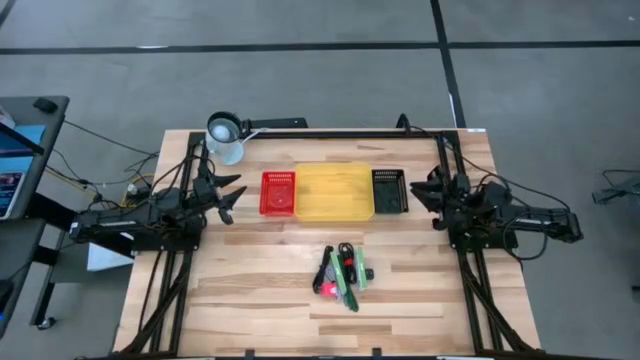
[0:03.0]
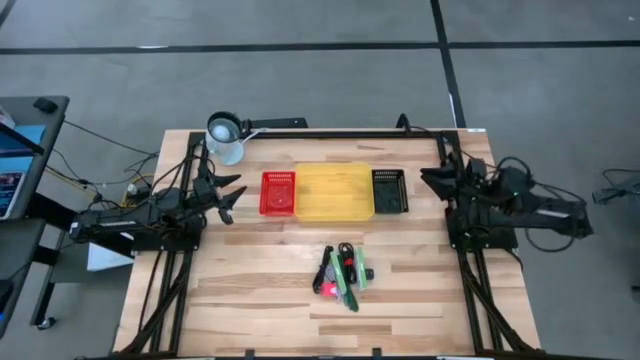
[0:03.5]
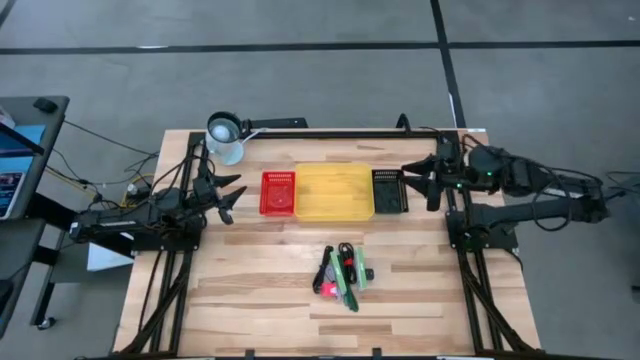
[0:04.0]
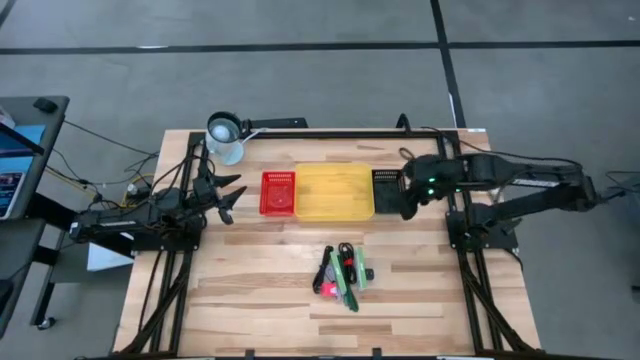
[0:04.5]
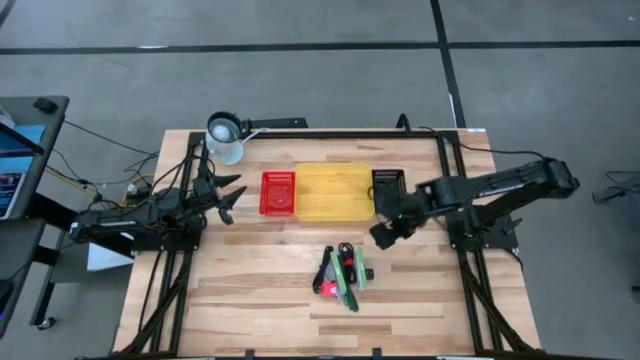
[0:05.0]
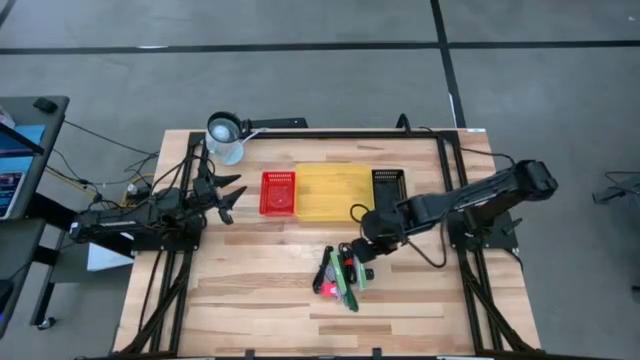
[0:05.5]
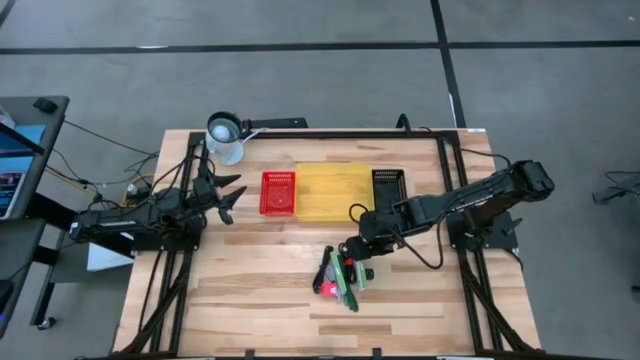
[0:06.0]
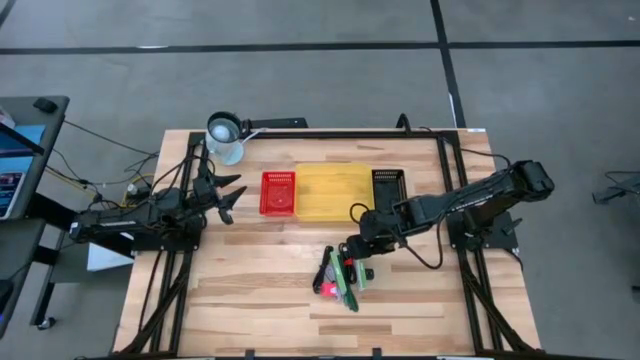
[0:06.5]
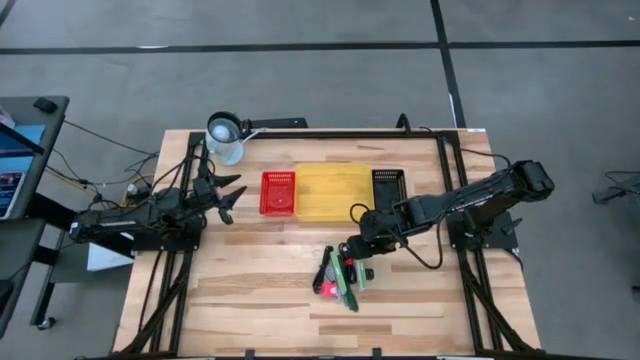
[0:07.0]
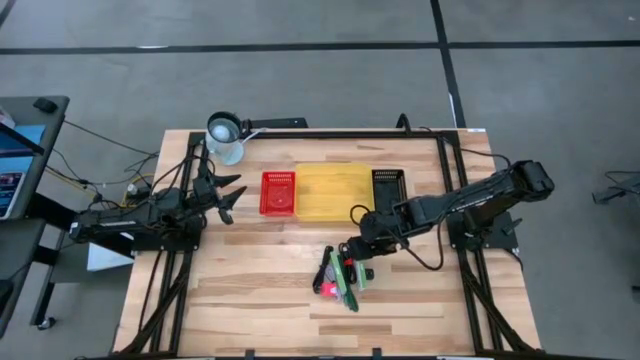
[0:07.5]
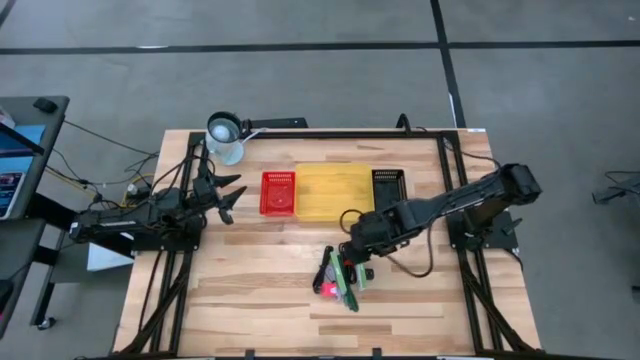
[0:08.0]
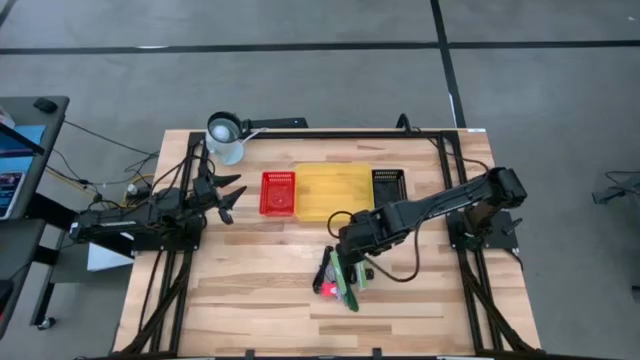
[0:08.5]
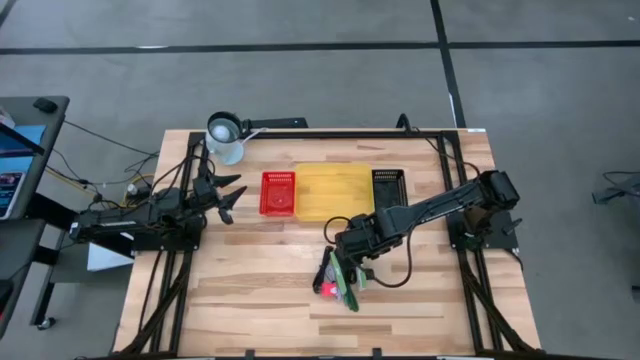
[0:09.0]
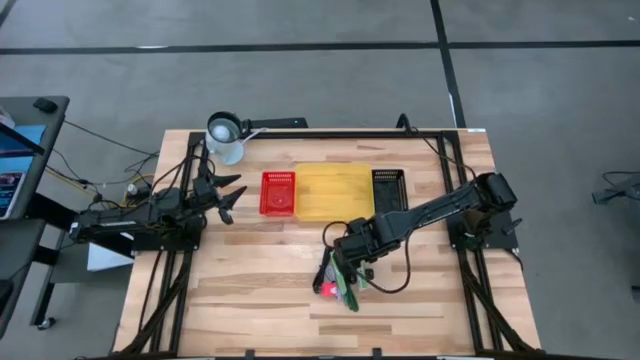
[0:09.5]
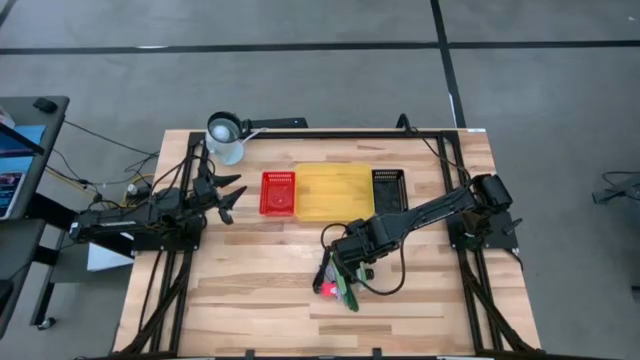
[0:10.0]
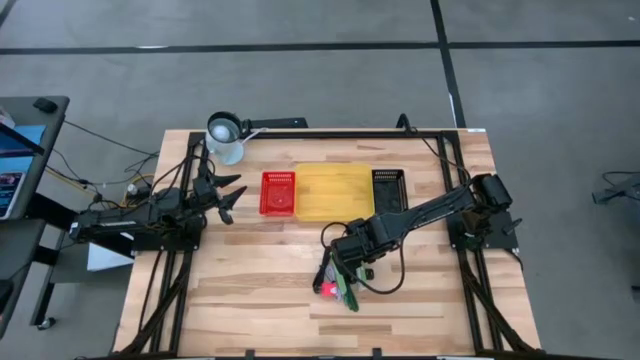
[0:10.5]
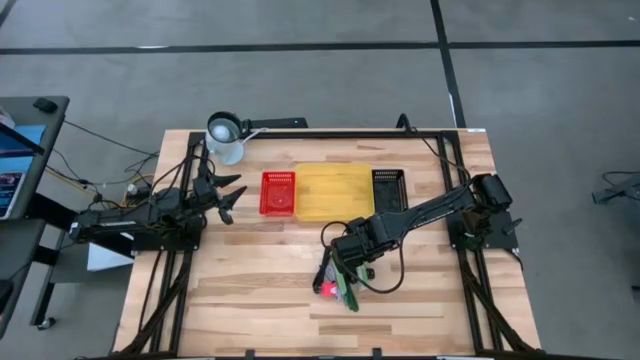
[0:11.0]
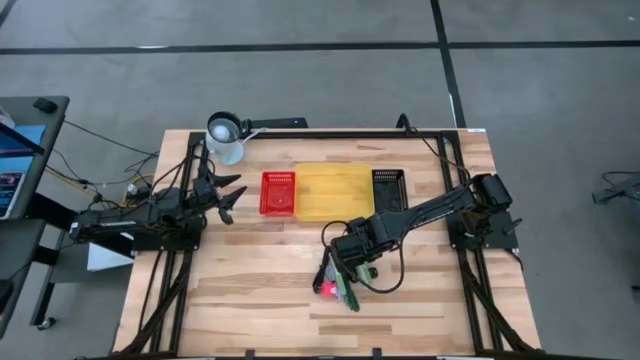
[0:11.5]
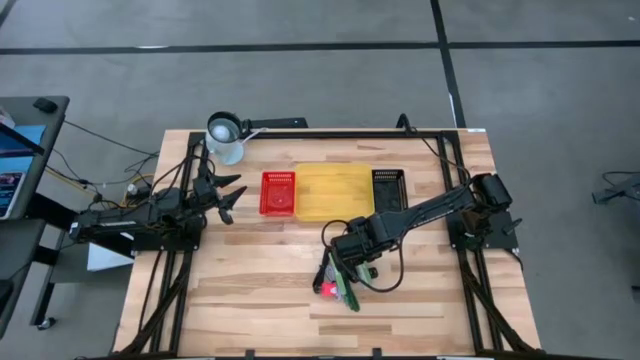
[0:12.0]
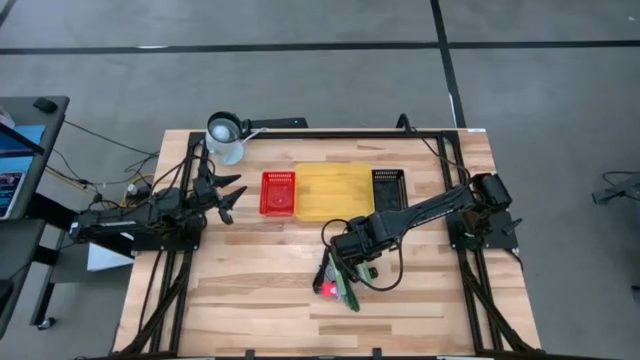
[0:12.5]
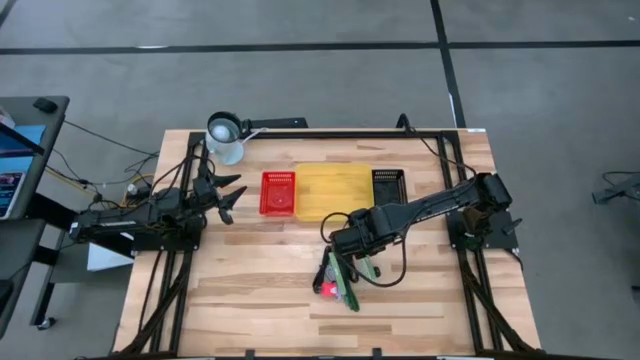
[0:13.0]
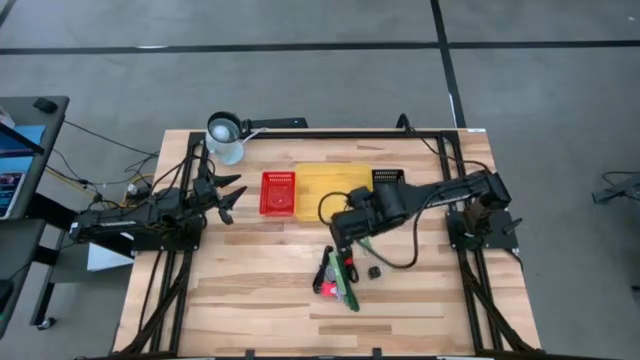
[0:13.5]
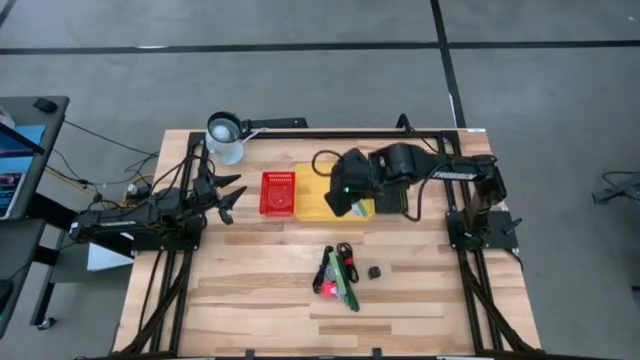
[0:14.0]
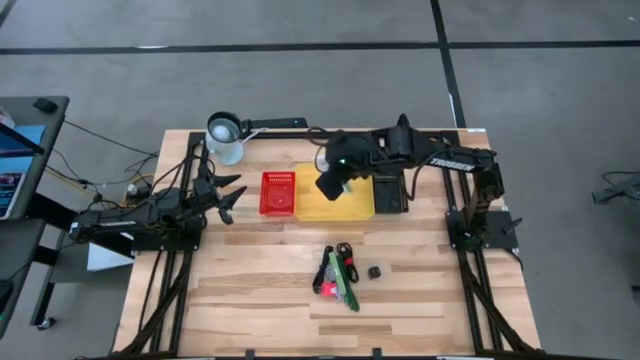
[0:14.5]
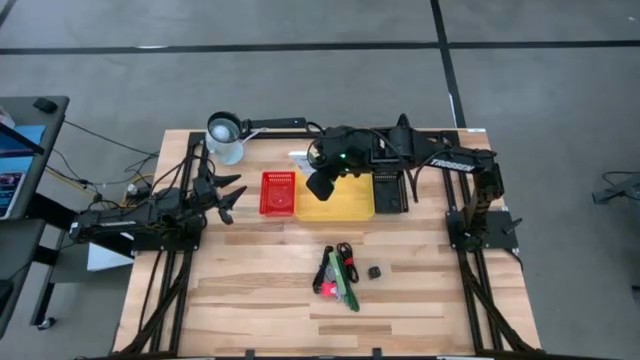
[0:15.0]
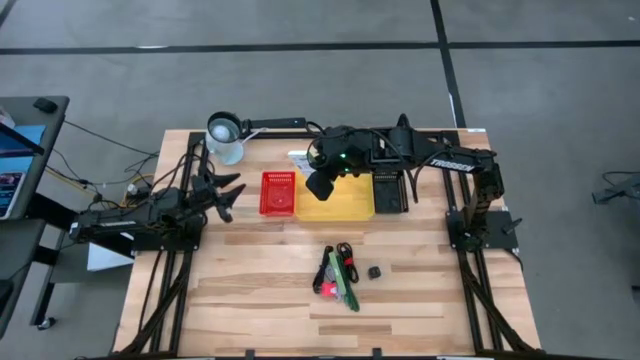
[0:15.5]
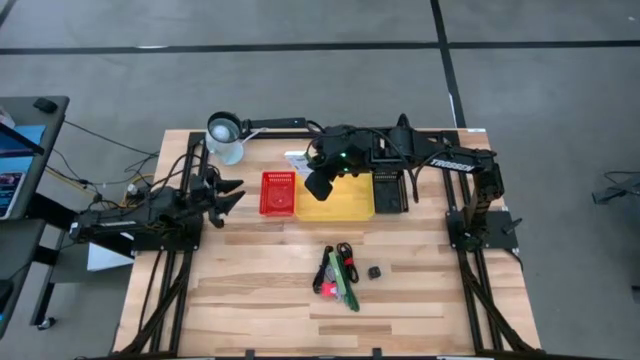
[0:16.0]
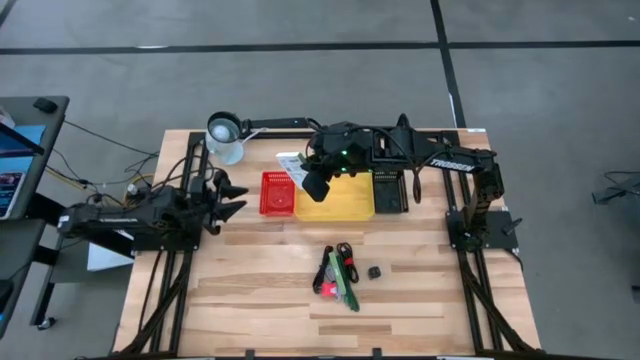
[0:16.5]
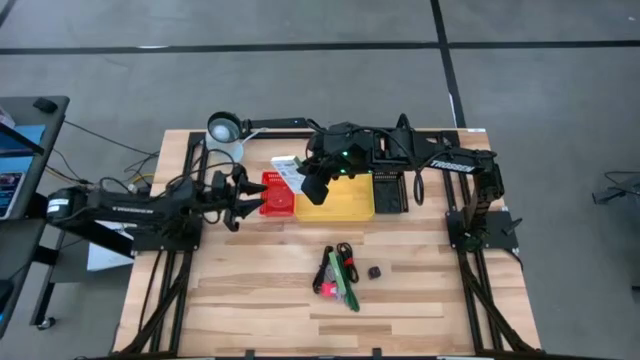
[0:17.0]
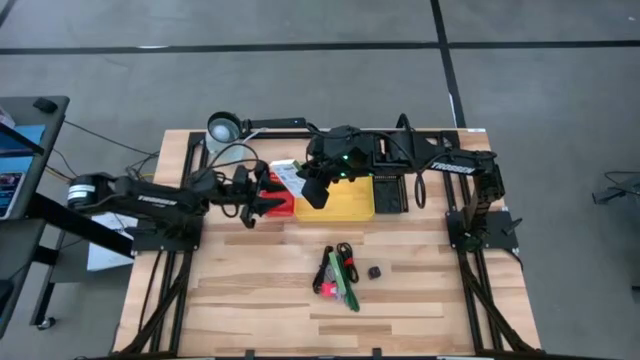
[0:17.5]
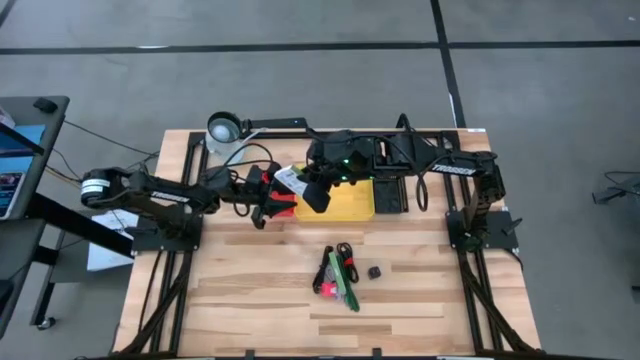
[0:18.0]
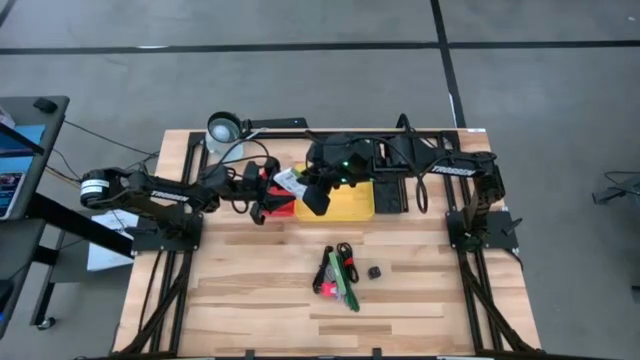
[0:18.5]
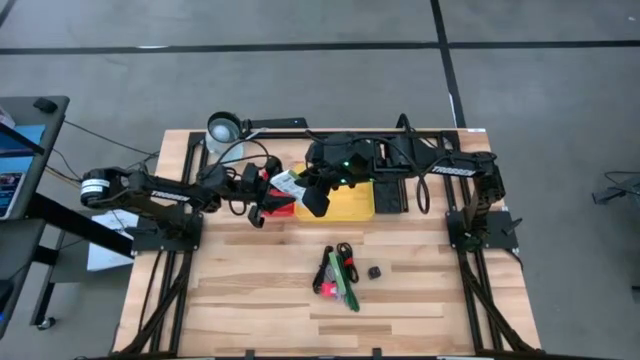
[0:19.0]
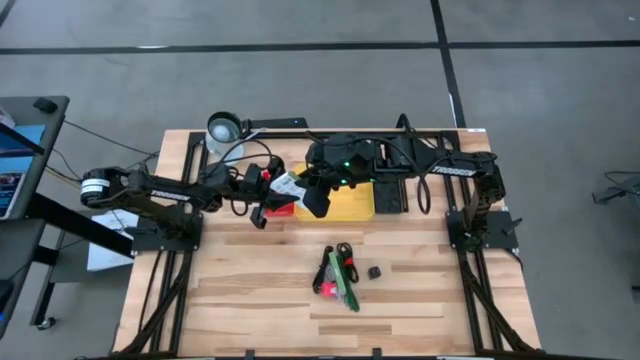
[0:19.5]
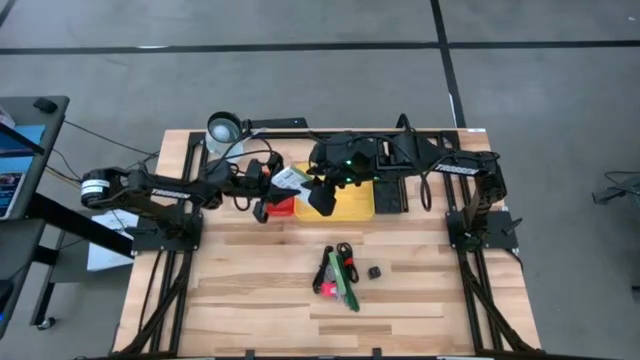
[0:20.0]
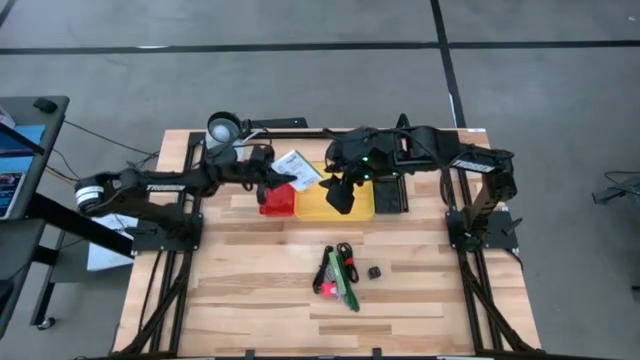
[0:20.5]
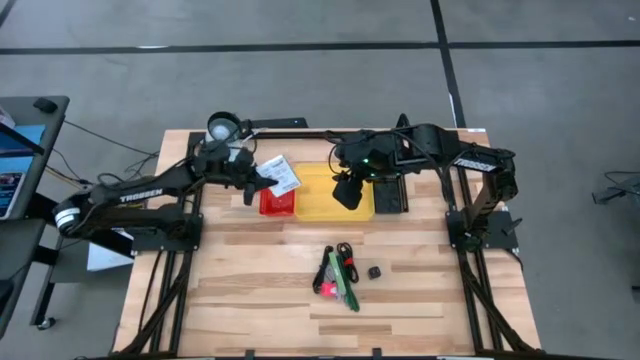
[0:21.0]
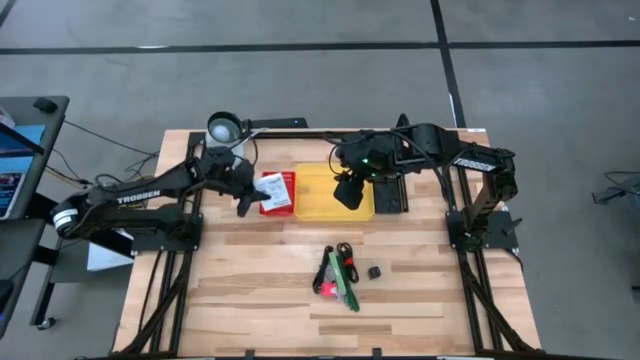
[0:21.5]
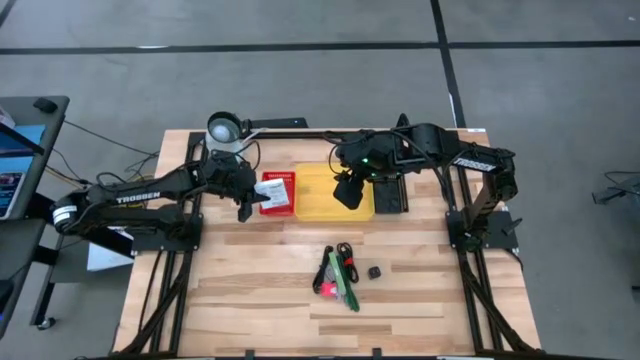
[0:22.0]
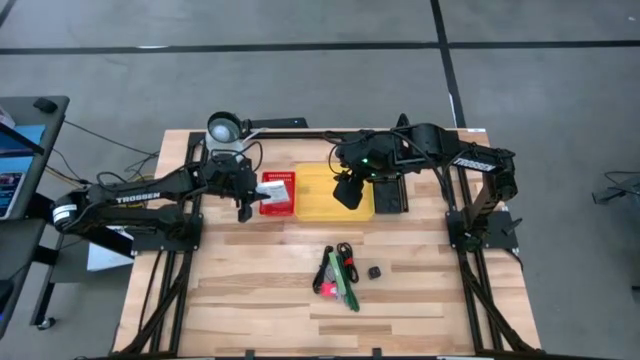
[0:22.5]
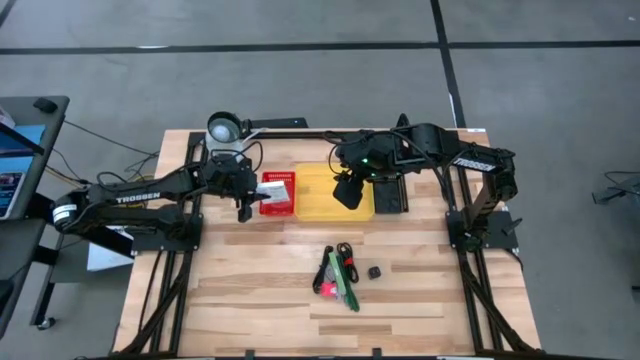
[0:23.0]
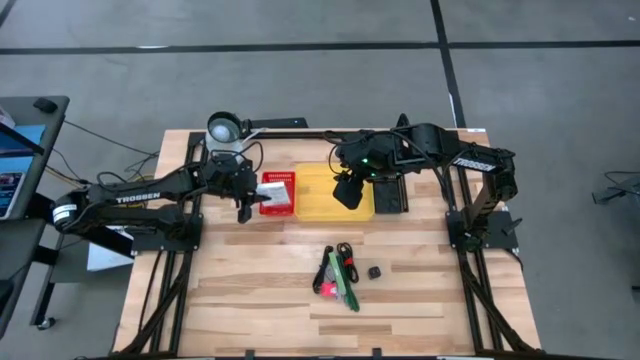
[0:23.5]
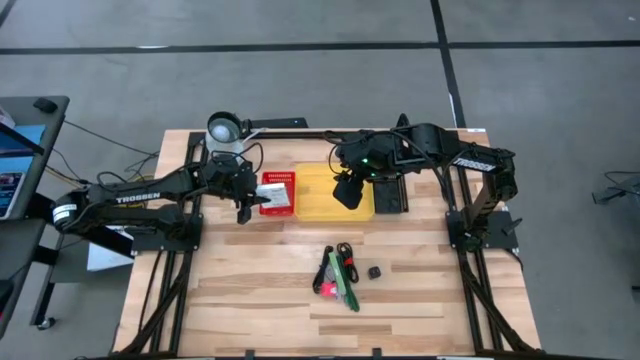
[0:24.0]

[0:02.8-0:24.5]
Task: Pick and place items into bin
Put the right card reader box into the red bin
